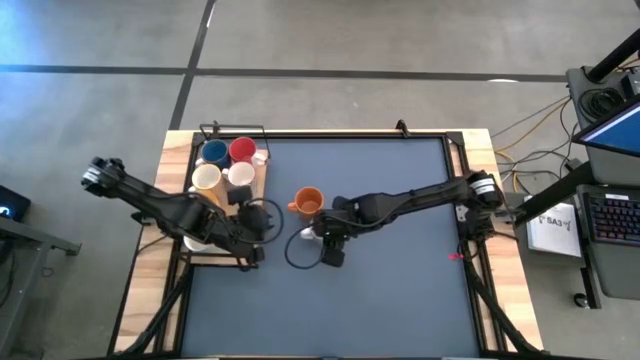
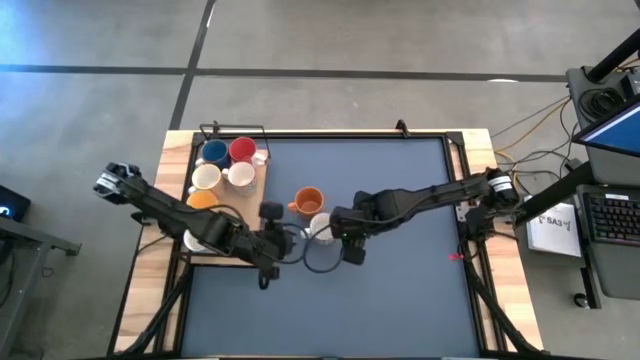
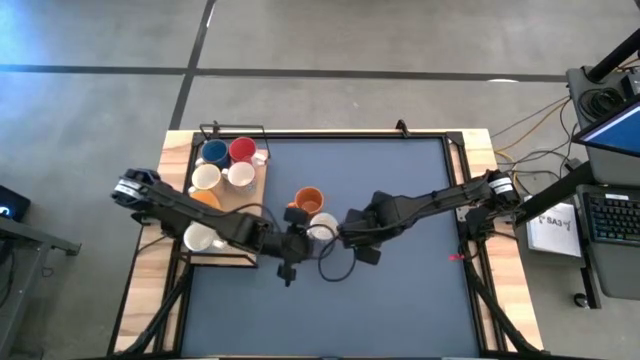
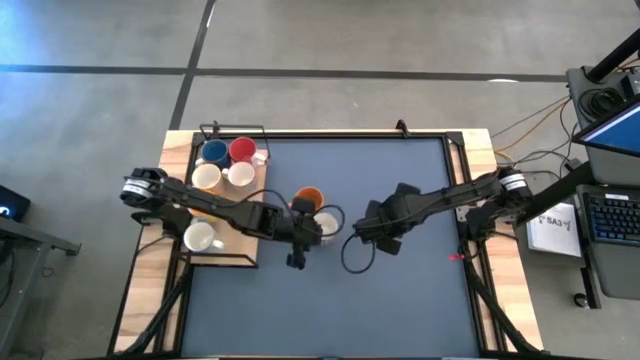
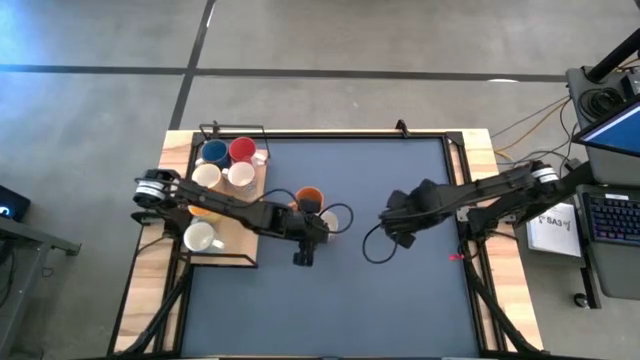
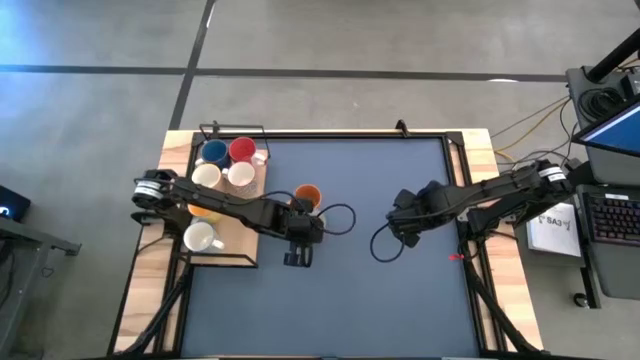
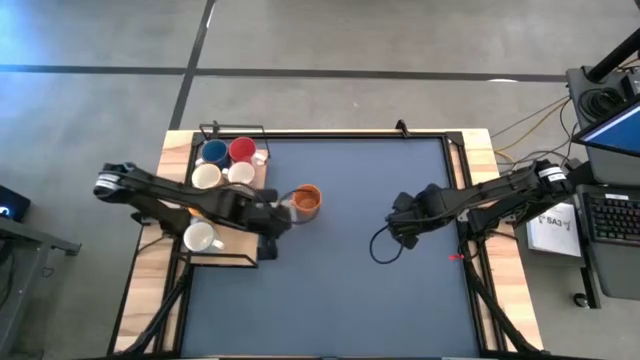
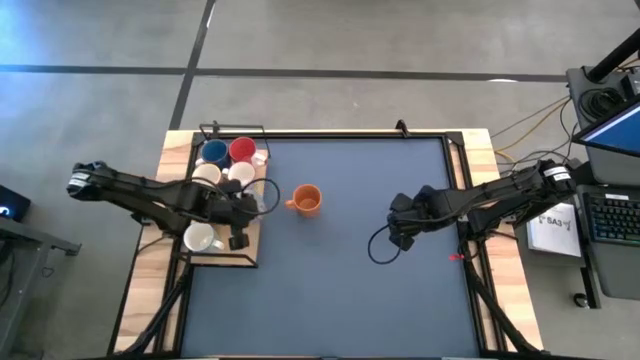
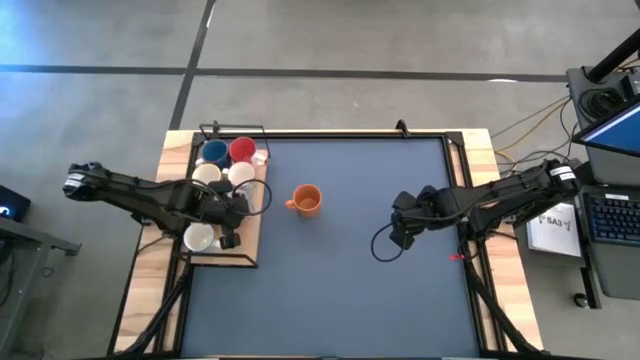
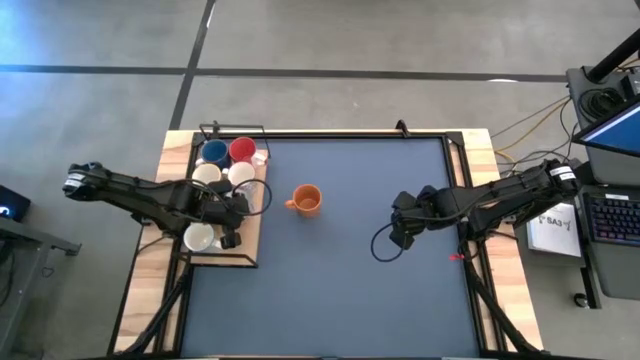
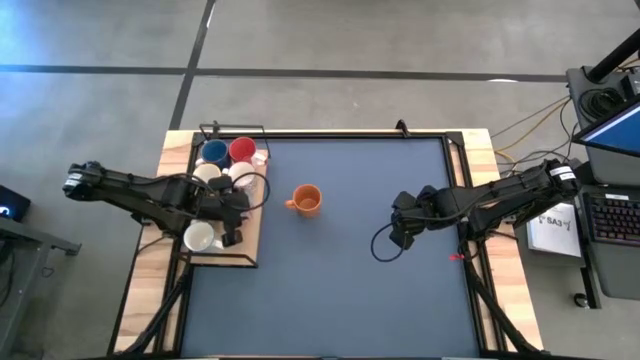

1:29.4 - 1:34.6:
Task: Place coffee mugs
Put the red patterned mug on the shelf

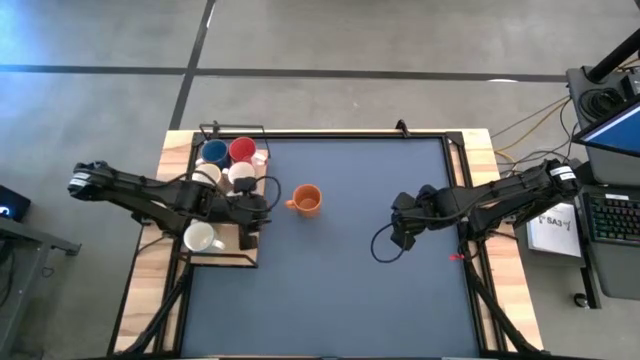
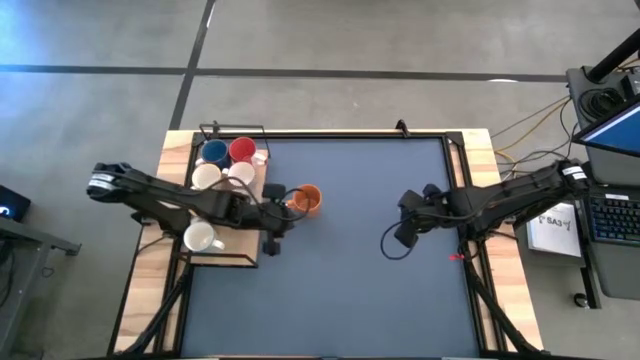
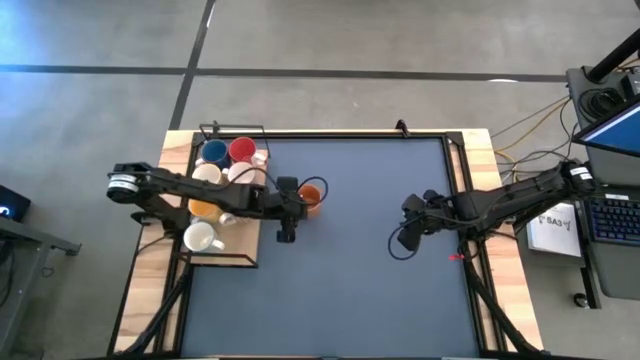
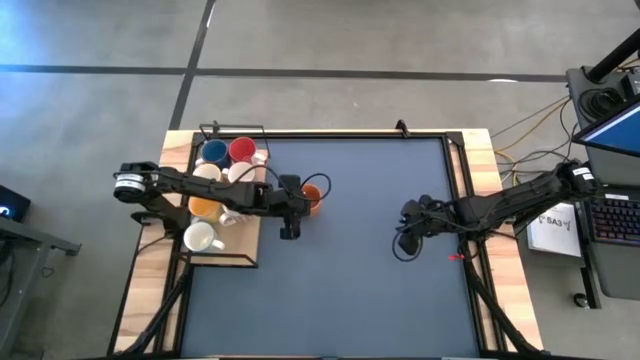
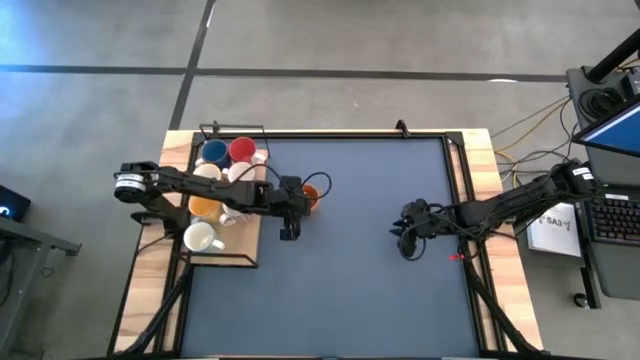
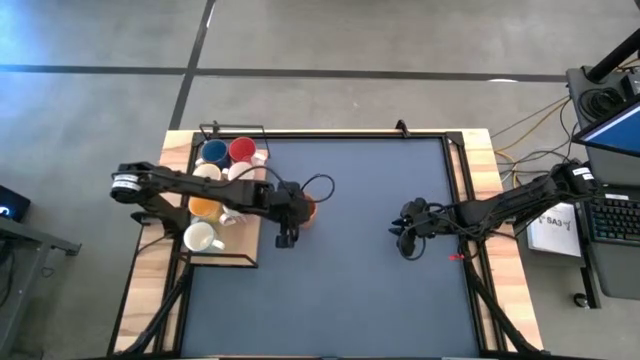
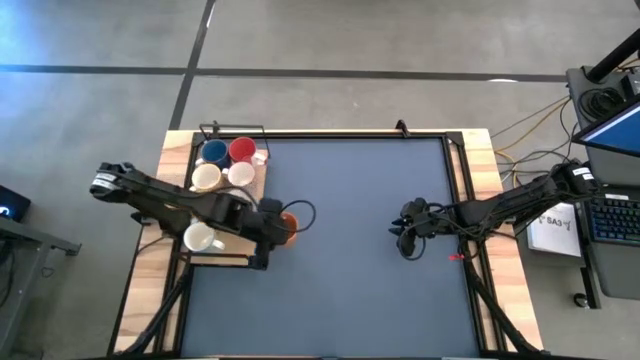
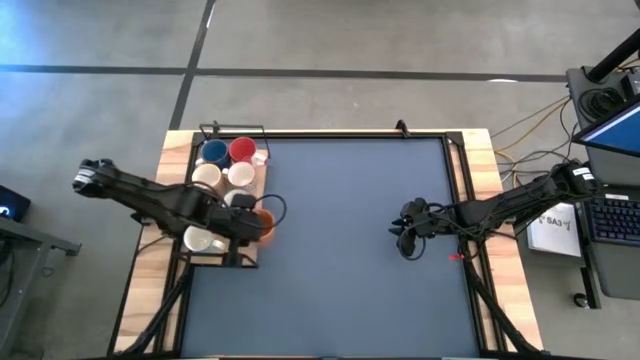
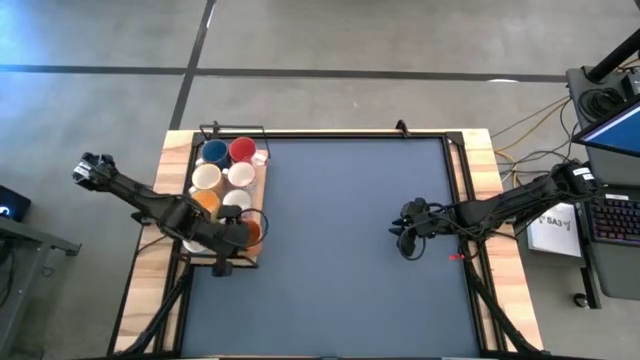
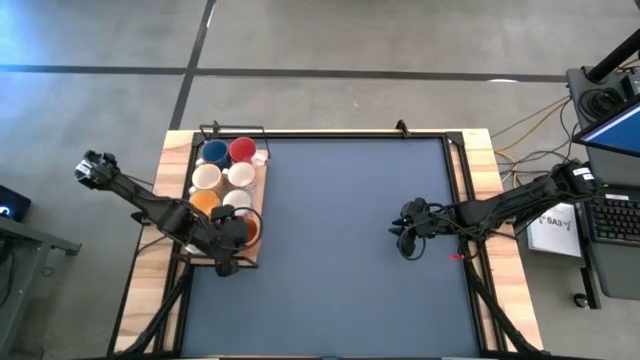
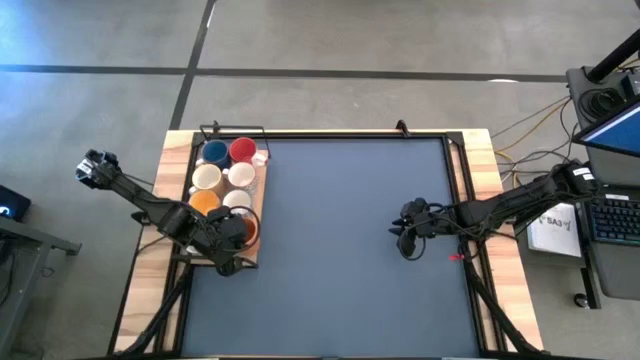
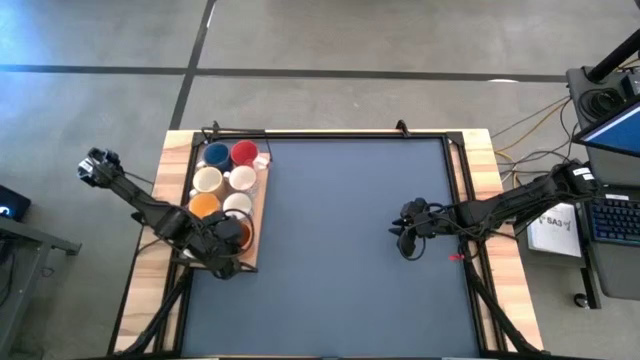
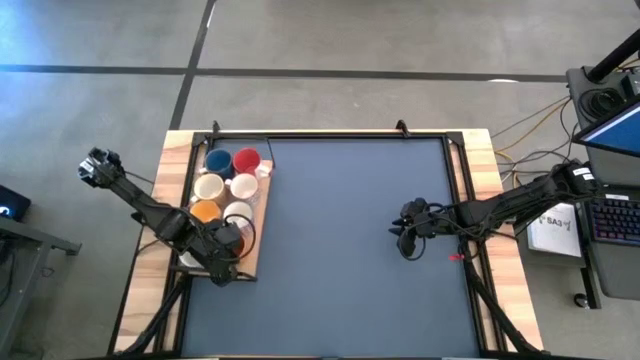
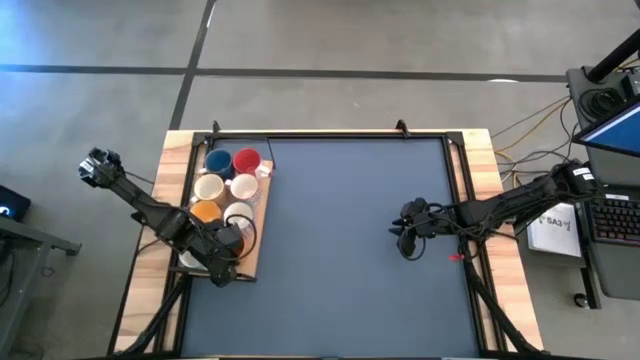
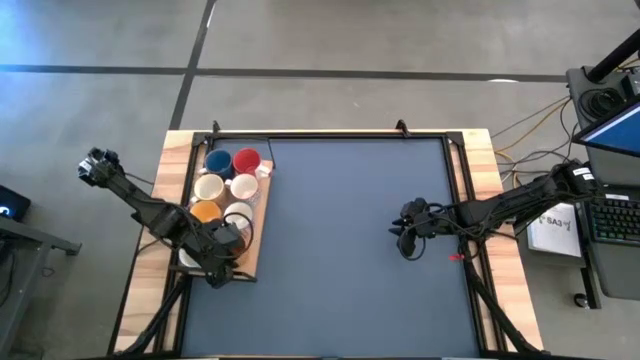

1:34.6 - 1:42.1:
Put the orange mug on the shelf

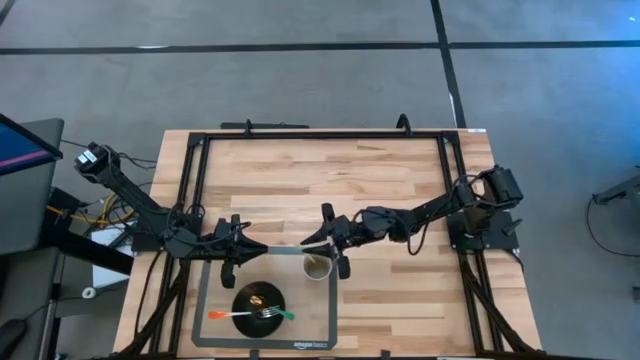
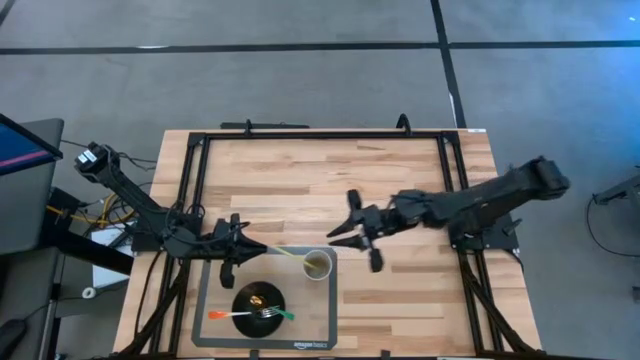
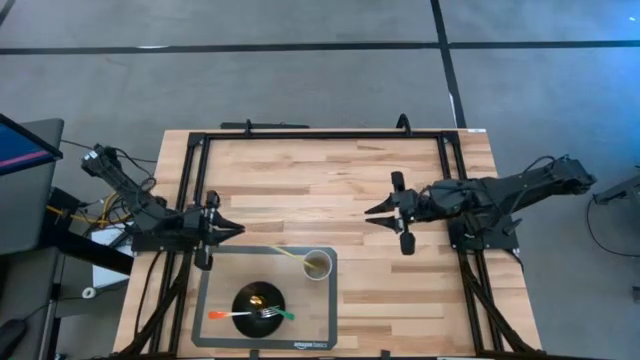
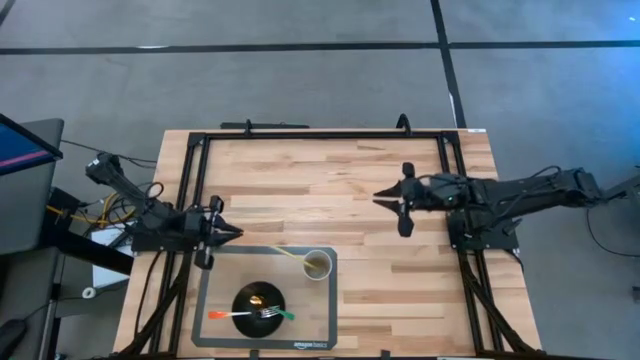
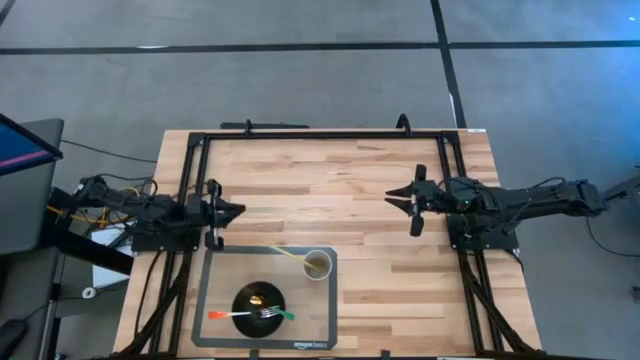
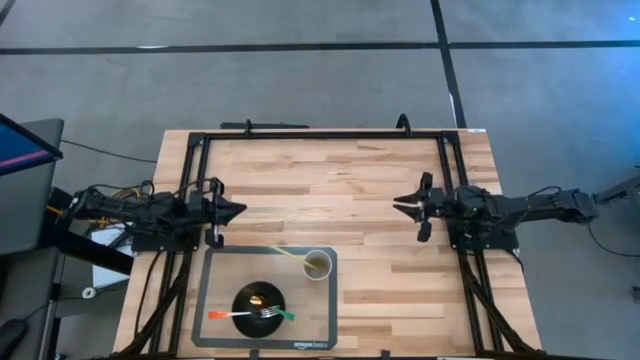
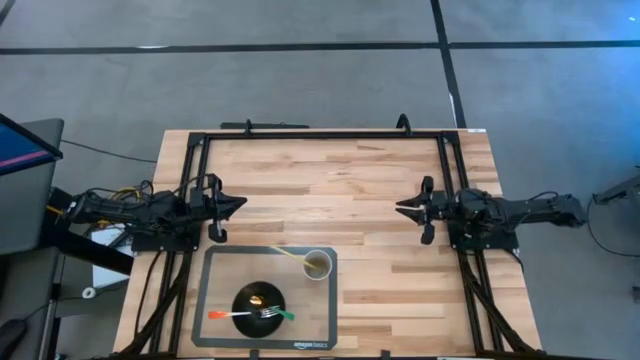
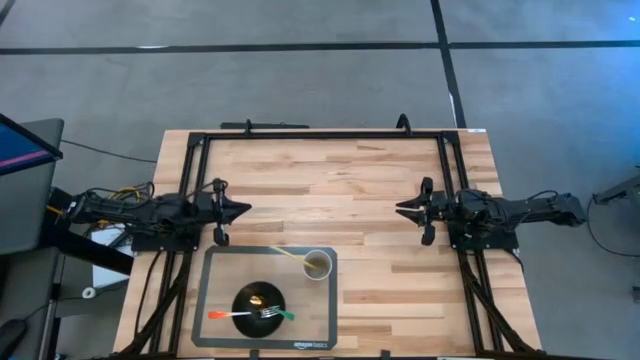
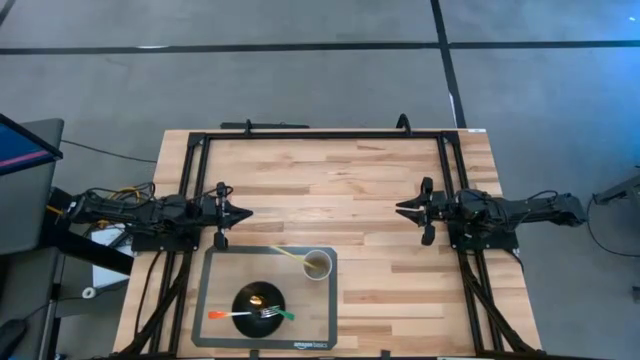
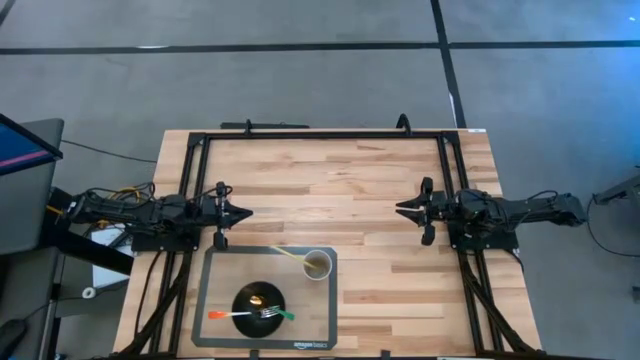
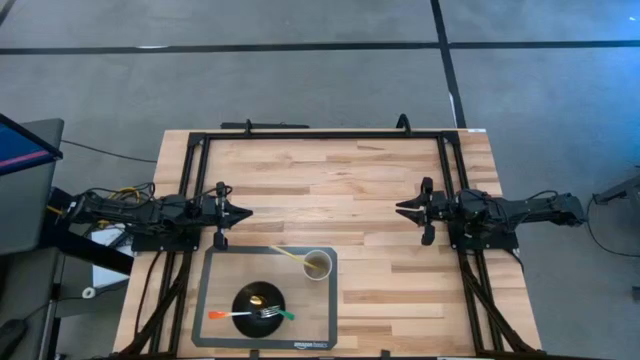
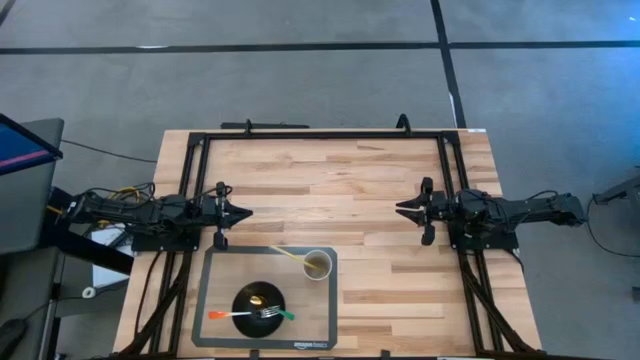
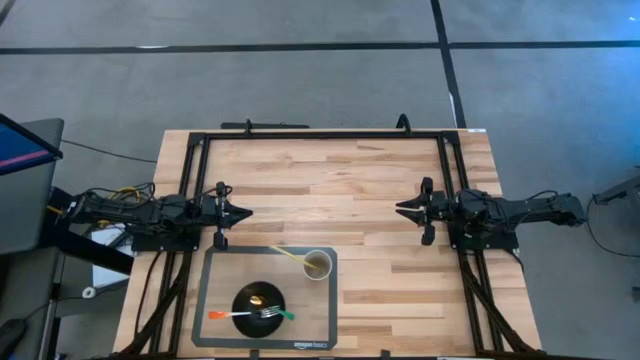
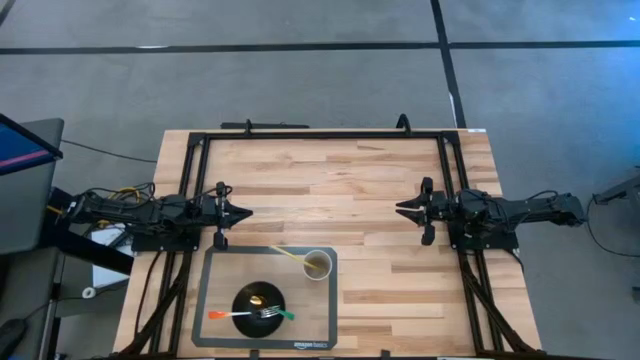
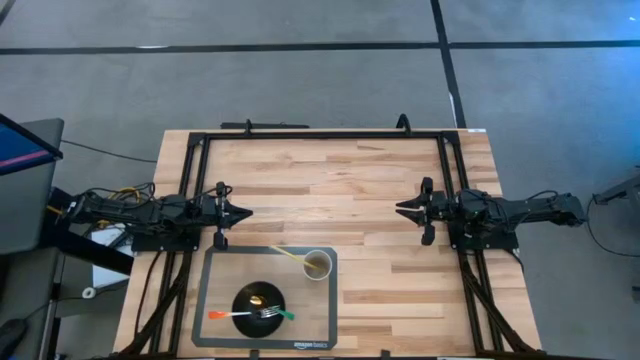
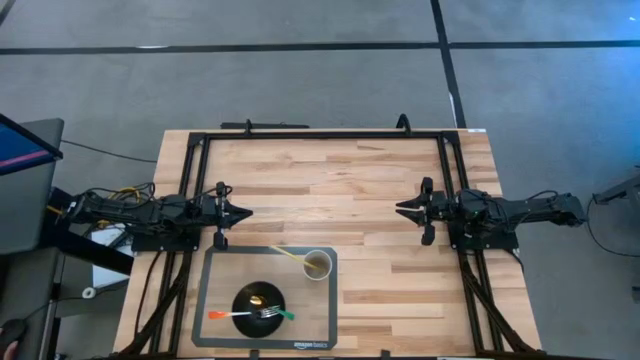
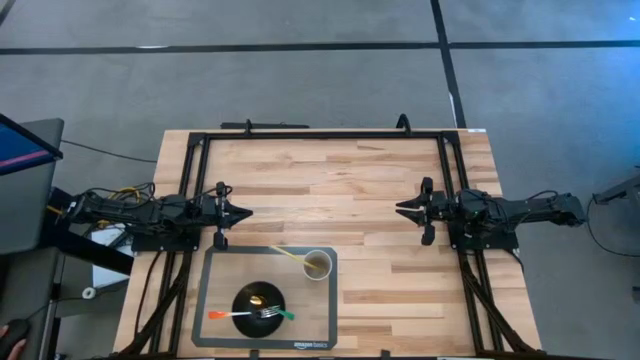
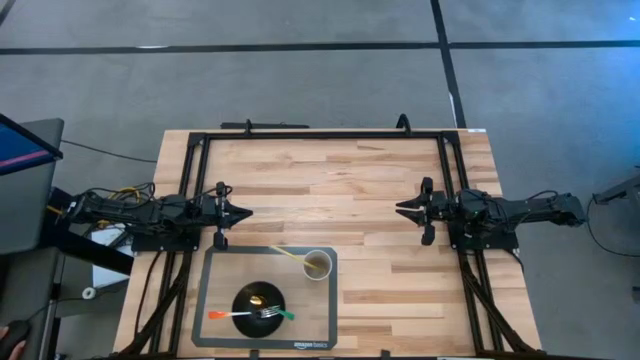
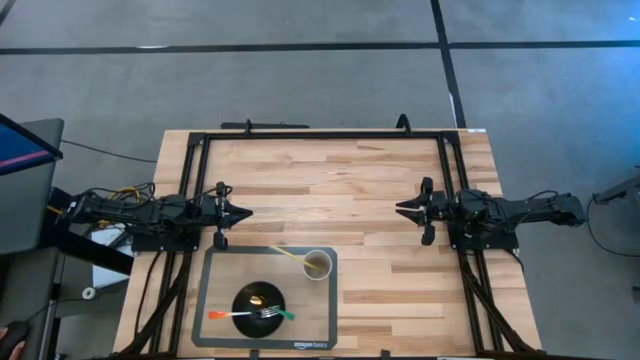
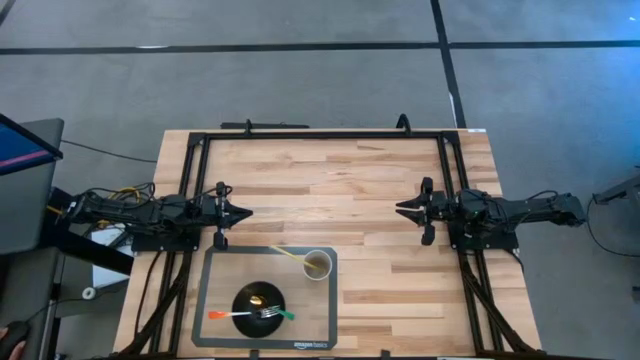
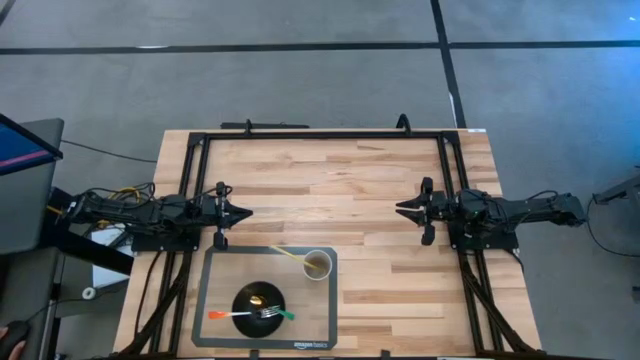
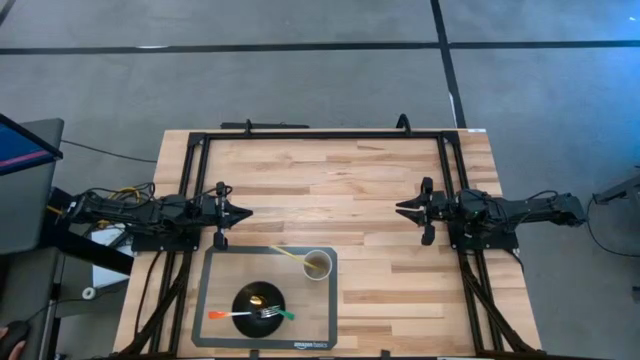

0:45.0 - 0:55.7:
Task: Pick & Place Utensil
Return to Home Position
